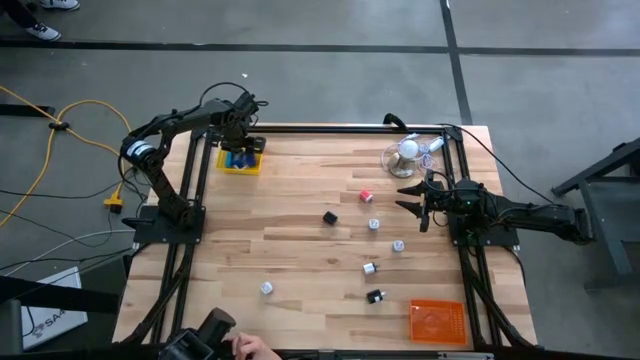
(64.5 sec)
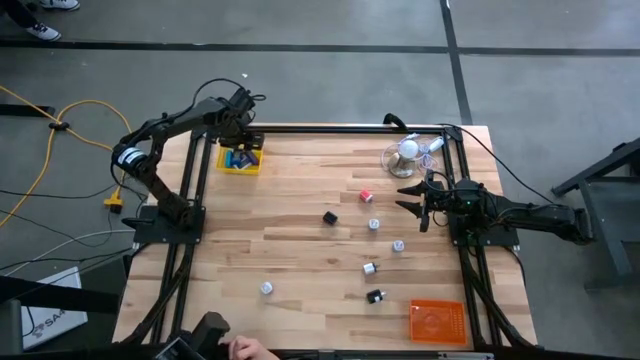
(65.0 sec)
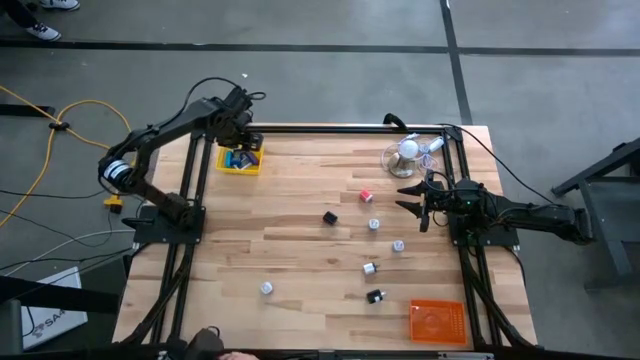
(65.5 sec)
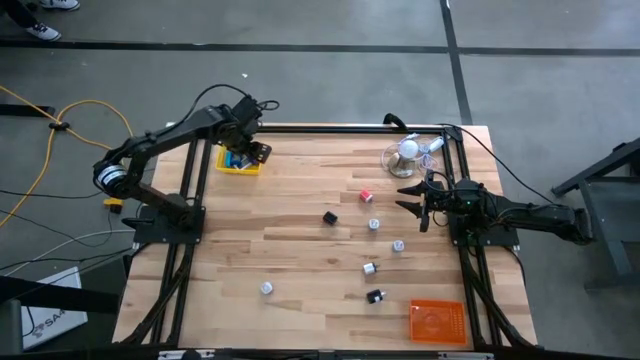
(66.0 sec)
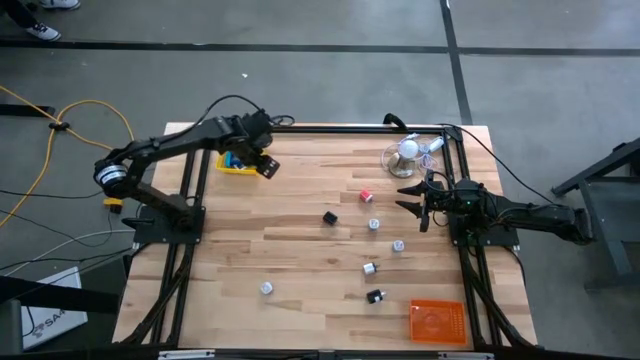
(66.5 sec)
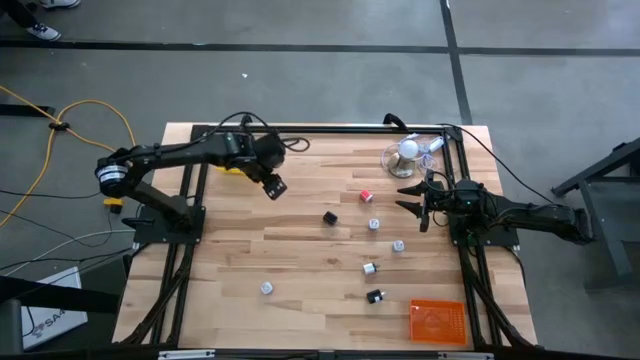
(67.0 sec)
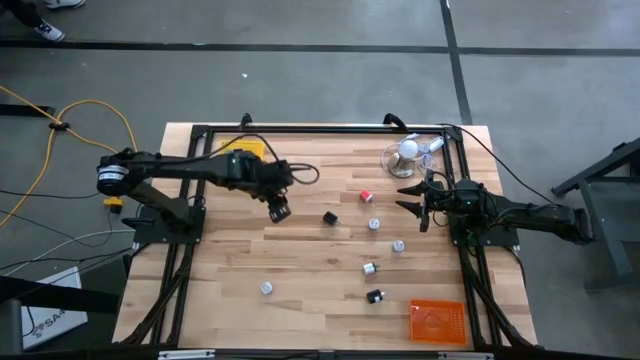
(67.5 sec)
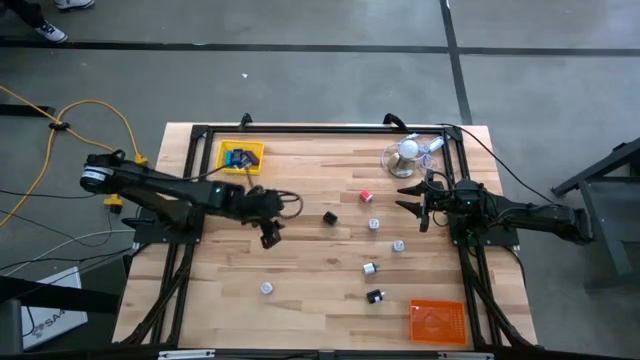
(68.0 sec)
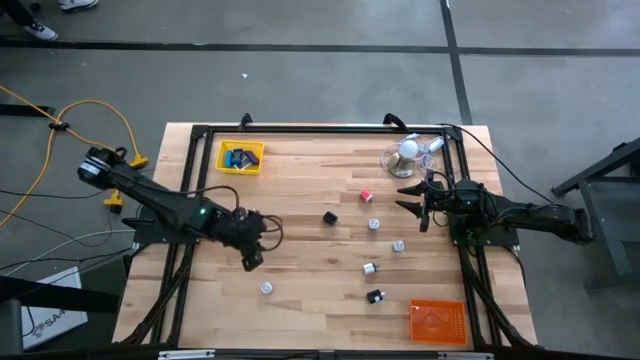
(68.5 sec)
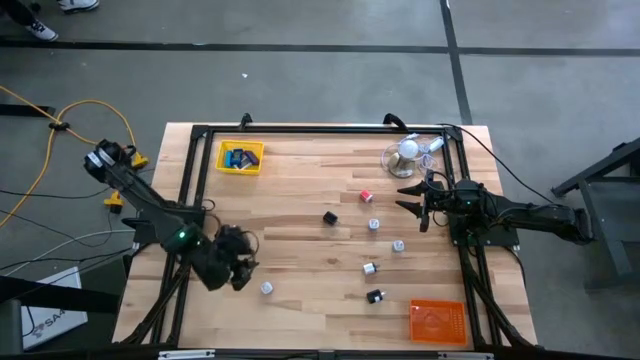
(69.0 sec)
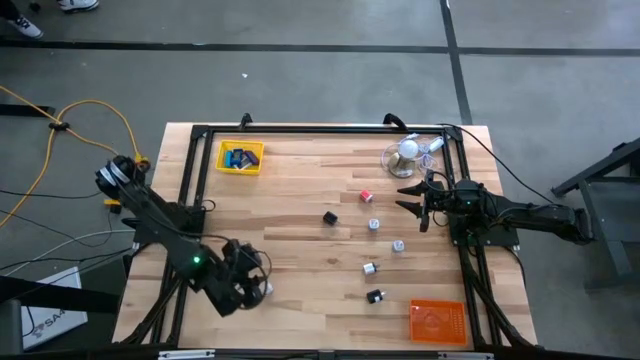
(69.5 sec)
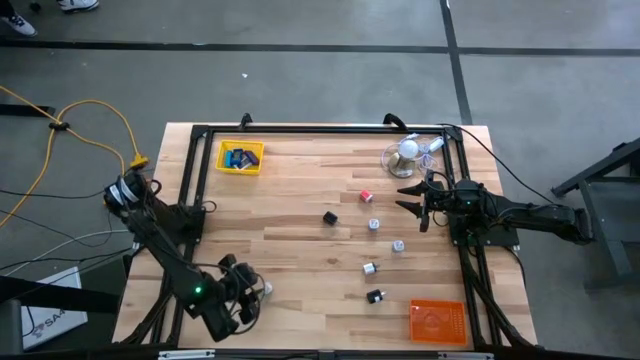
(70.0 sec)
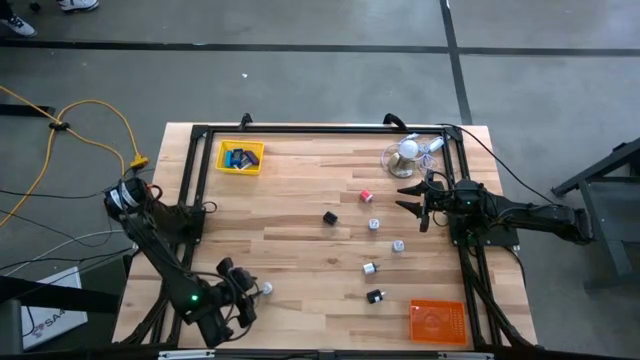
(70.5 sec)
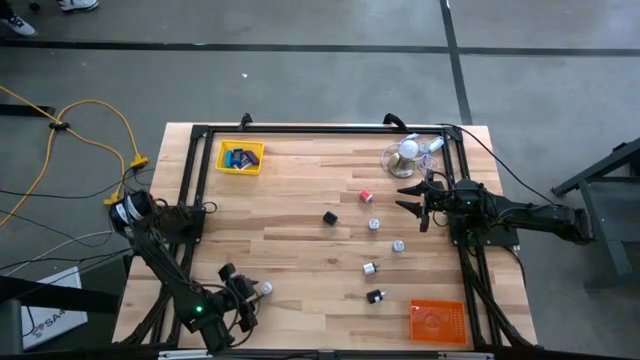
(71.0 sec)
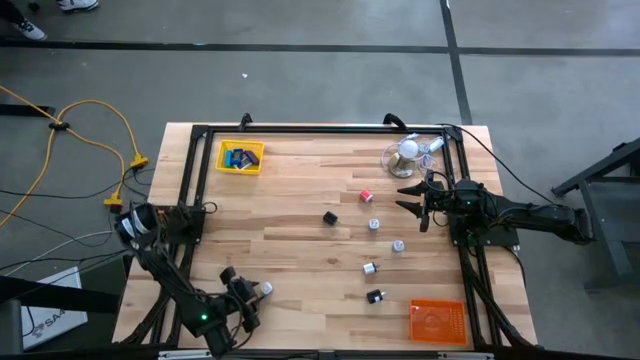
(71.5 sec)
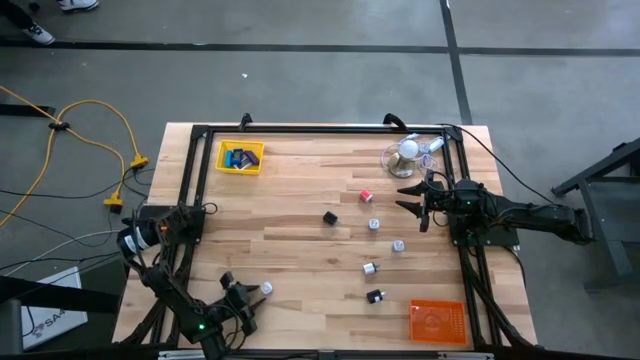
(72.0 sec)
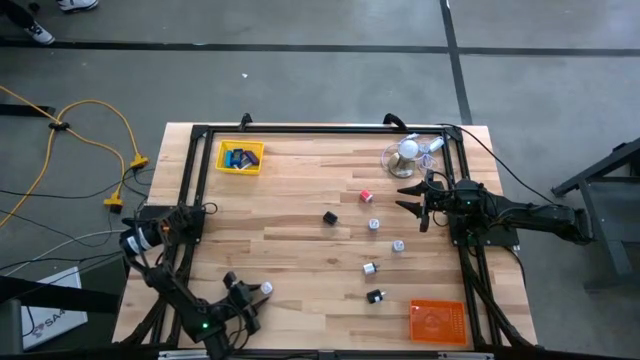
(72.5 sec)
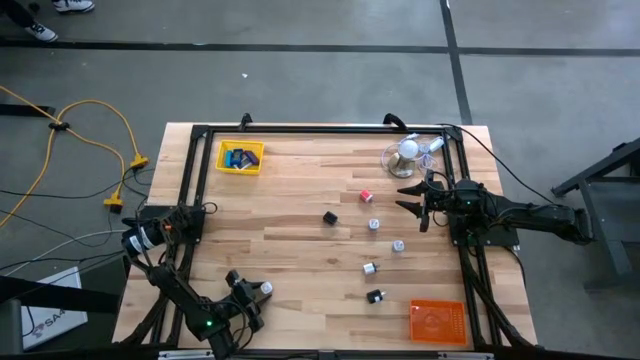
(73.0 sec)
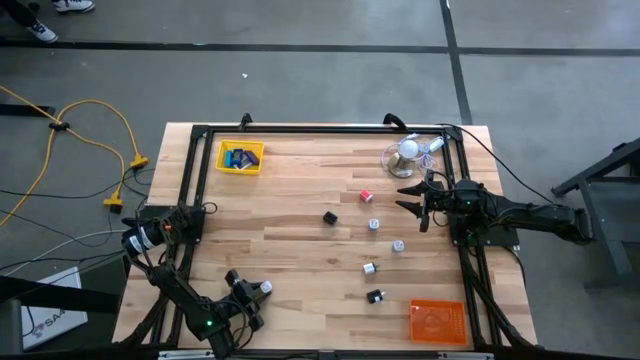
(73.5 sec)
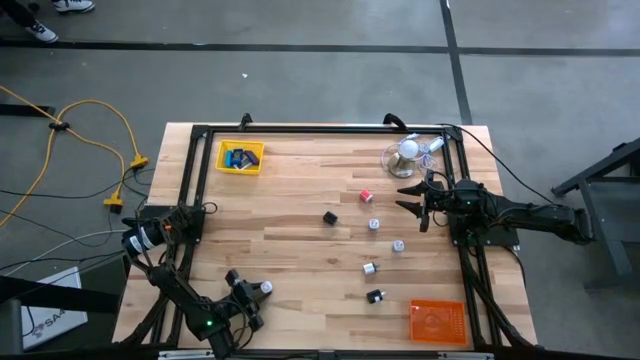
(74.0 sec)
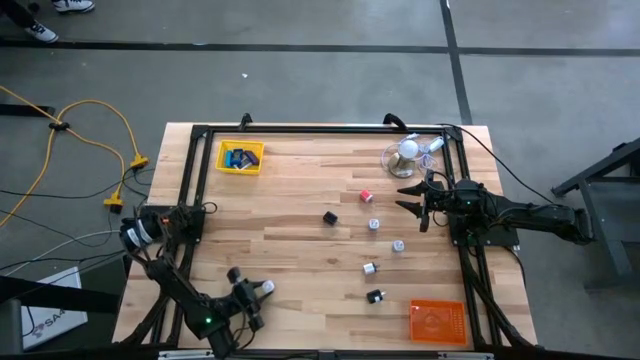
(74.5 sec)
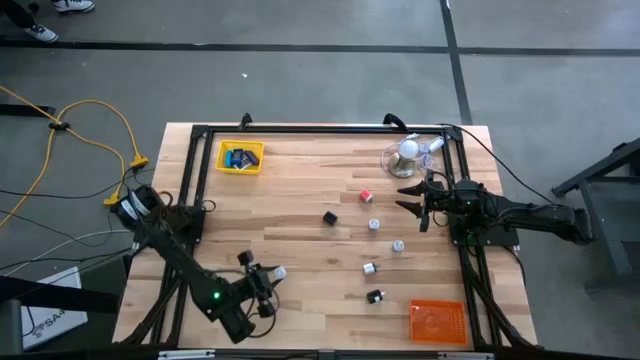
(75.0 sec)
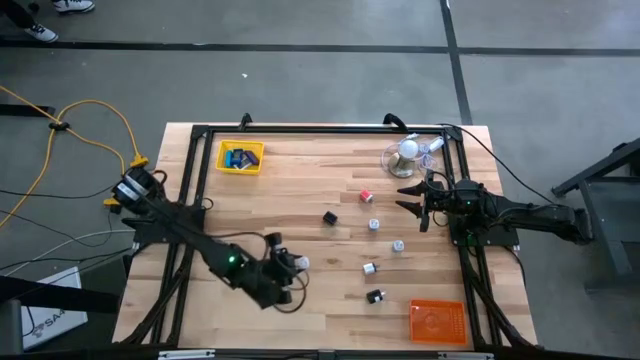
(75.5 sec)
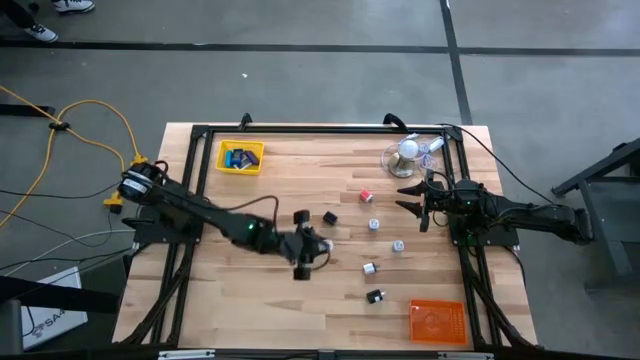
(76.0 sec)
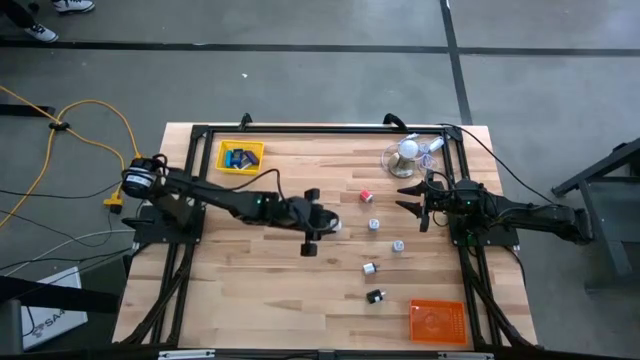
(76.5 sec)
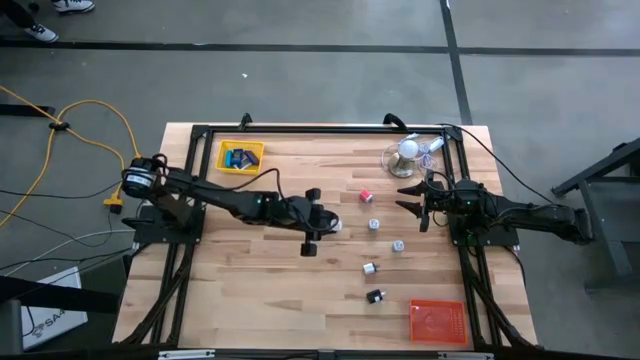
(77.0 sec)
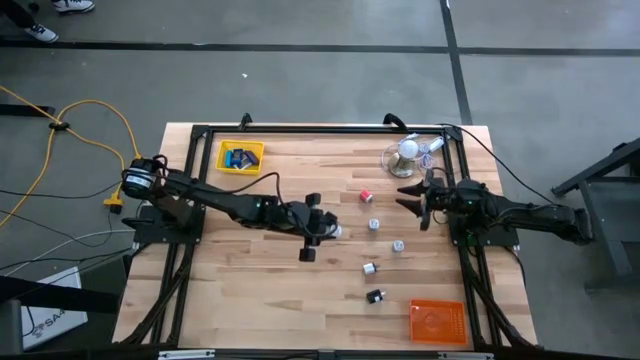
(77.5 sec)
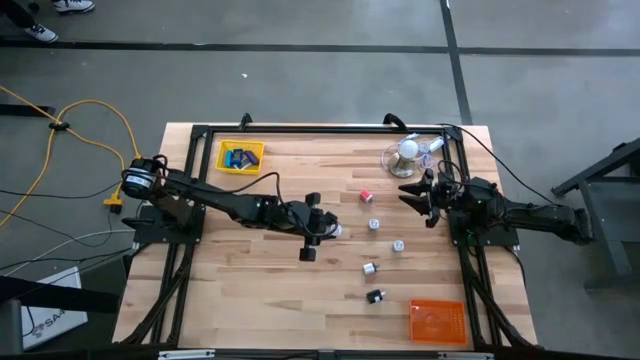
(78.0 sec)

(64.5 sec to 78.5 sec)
Task: Pick & Place Office items
Put the purple charger adapter into the orange bin
